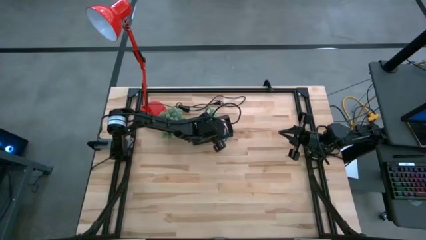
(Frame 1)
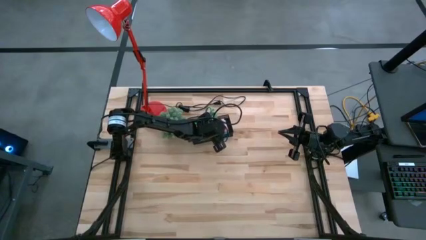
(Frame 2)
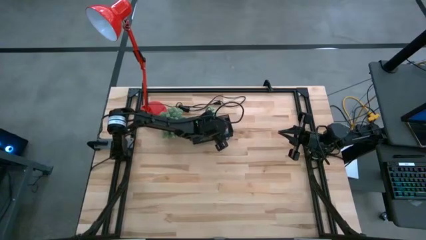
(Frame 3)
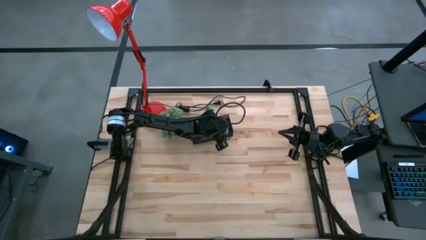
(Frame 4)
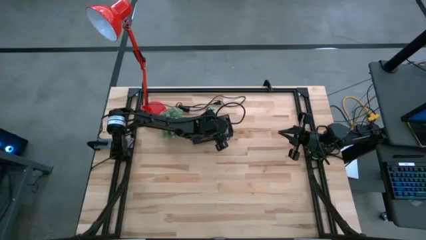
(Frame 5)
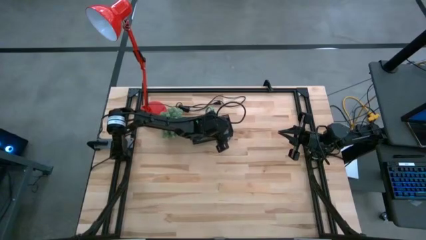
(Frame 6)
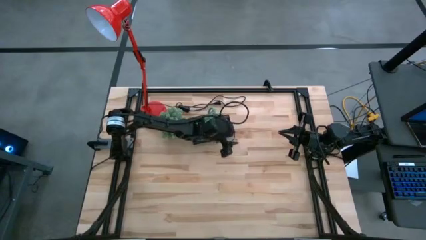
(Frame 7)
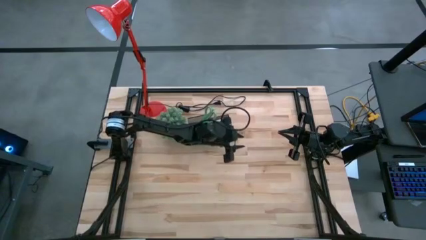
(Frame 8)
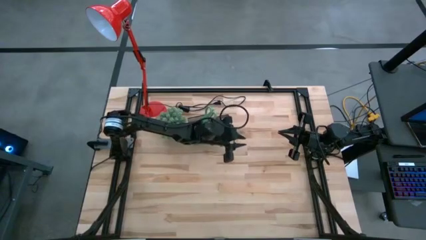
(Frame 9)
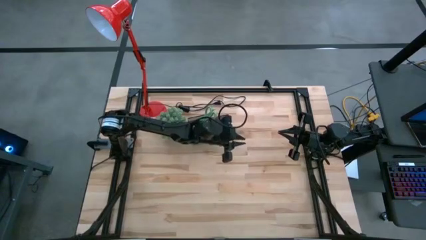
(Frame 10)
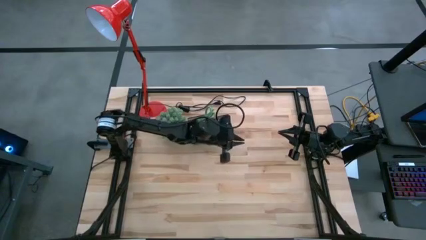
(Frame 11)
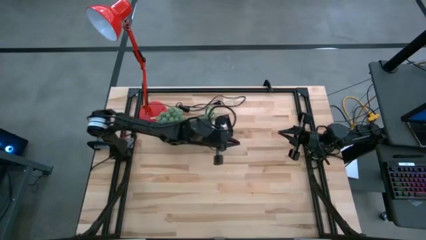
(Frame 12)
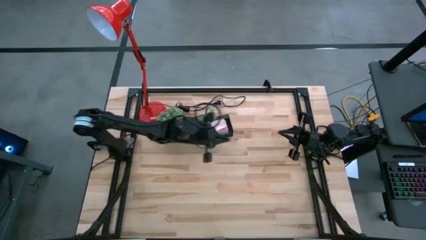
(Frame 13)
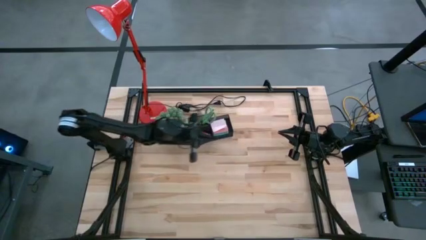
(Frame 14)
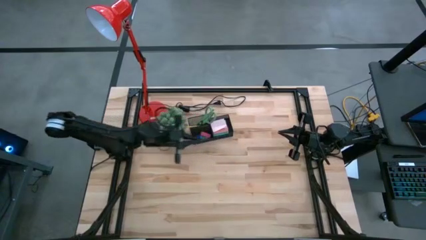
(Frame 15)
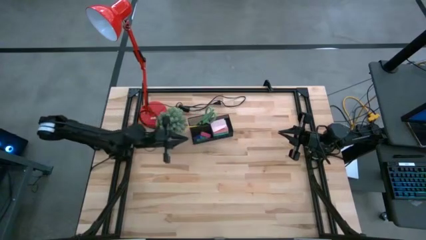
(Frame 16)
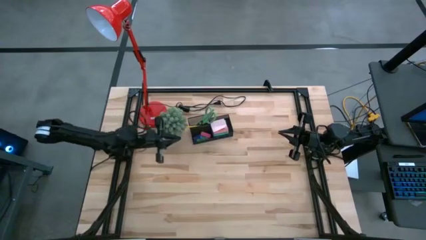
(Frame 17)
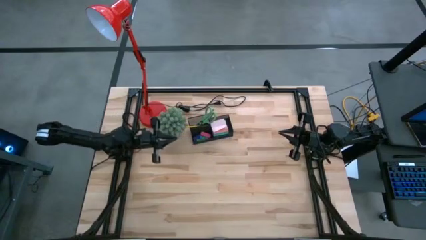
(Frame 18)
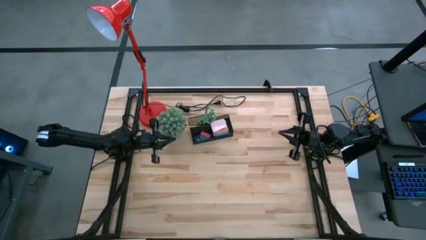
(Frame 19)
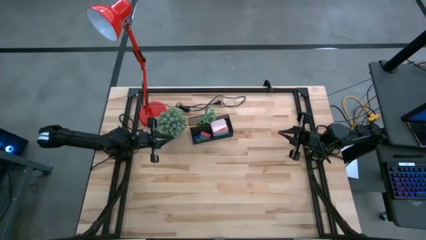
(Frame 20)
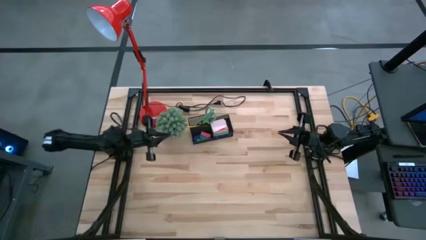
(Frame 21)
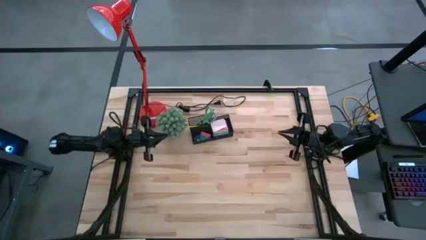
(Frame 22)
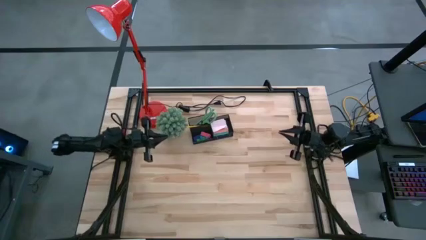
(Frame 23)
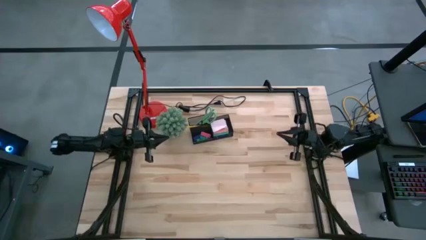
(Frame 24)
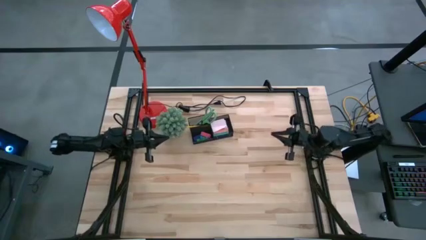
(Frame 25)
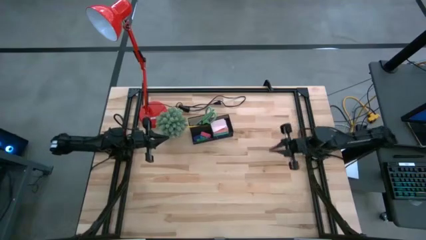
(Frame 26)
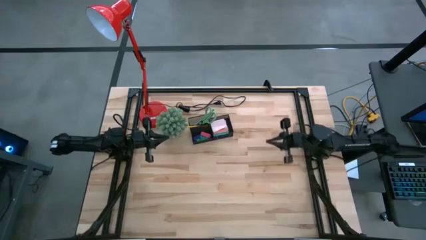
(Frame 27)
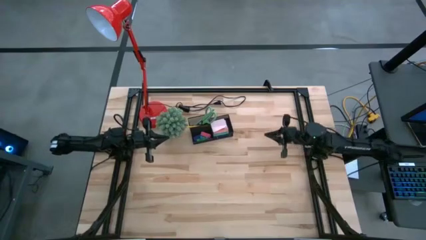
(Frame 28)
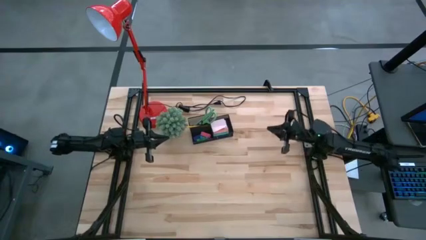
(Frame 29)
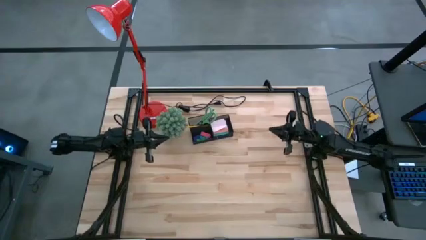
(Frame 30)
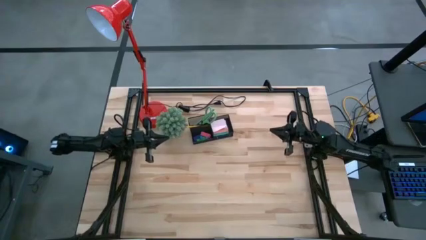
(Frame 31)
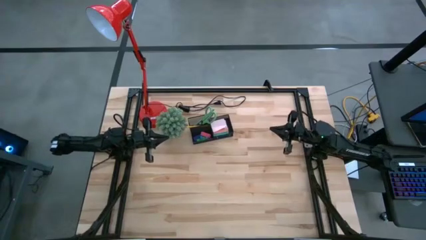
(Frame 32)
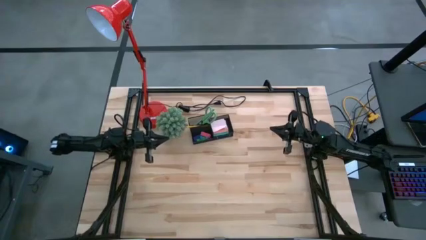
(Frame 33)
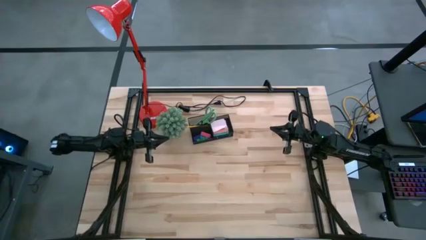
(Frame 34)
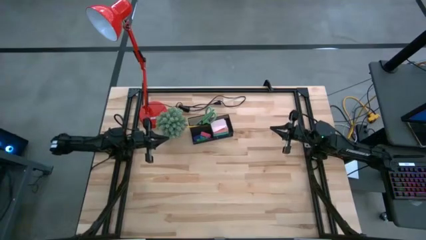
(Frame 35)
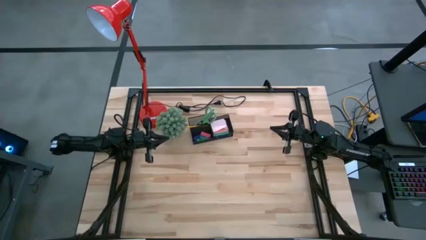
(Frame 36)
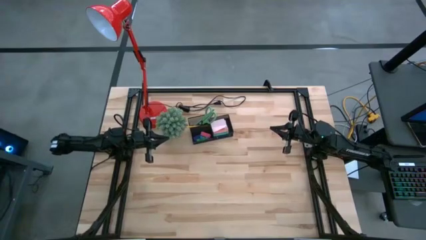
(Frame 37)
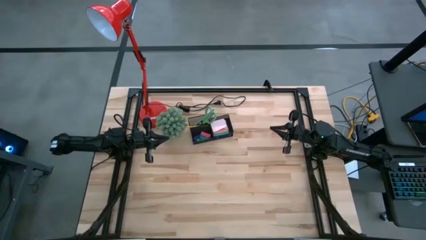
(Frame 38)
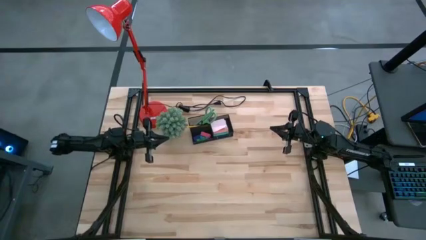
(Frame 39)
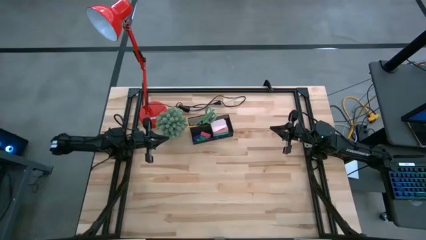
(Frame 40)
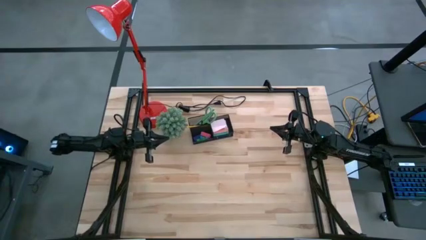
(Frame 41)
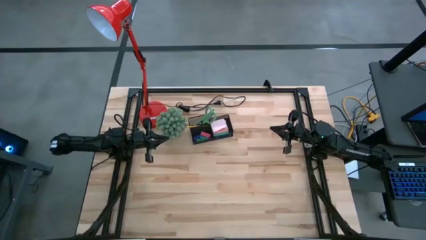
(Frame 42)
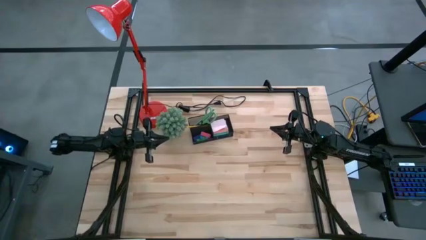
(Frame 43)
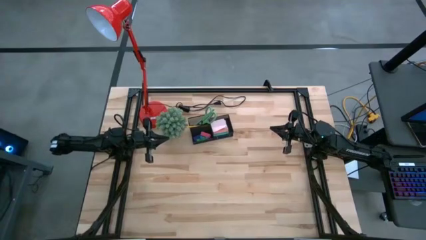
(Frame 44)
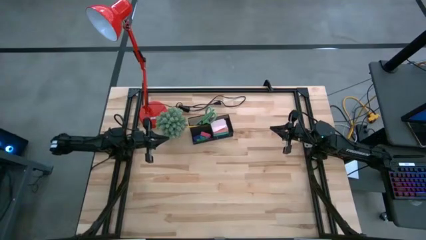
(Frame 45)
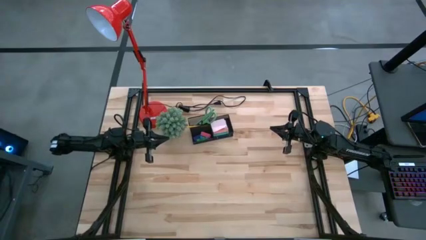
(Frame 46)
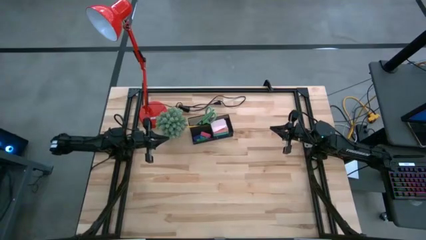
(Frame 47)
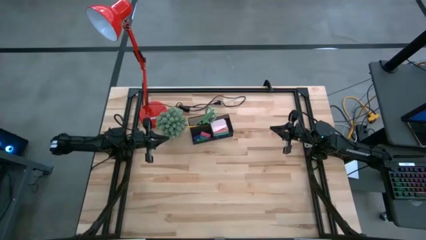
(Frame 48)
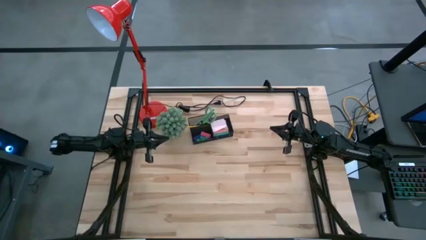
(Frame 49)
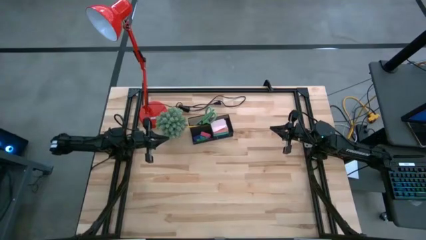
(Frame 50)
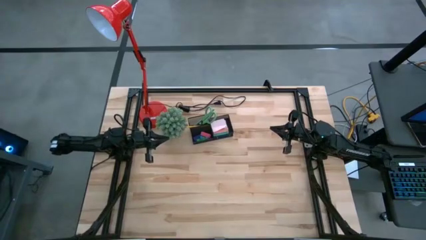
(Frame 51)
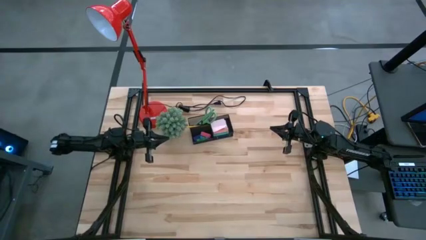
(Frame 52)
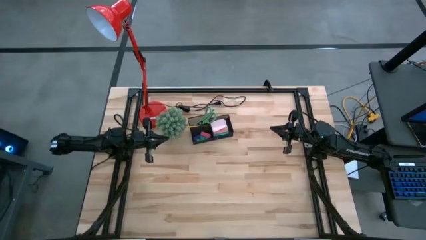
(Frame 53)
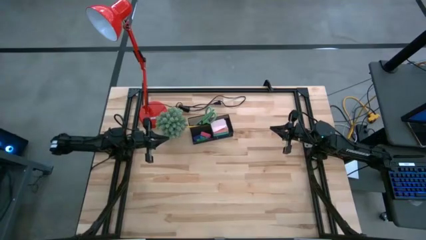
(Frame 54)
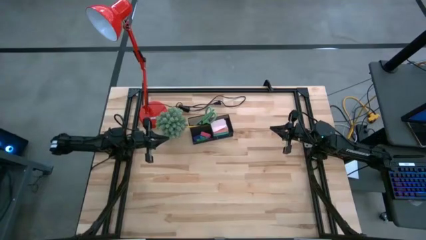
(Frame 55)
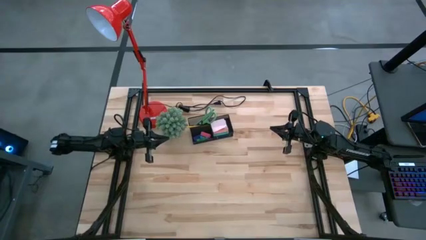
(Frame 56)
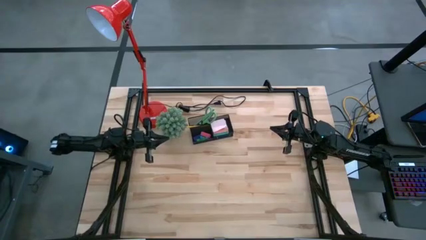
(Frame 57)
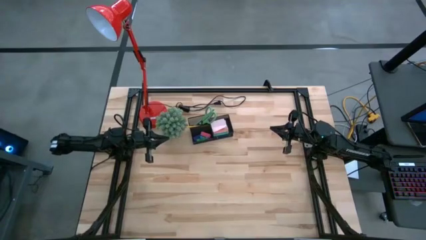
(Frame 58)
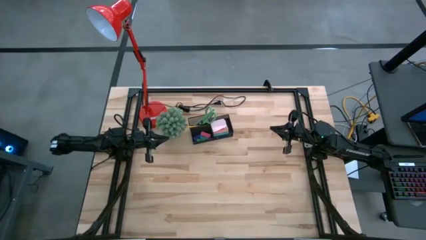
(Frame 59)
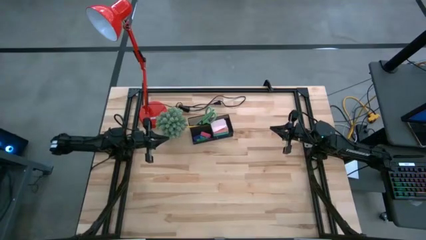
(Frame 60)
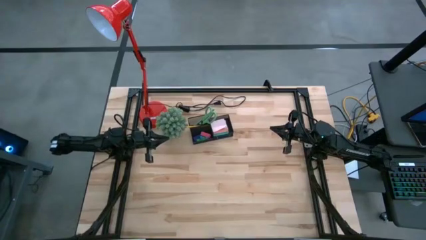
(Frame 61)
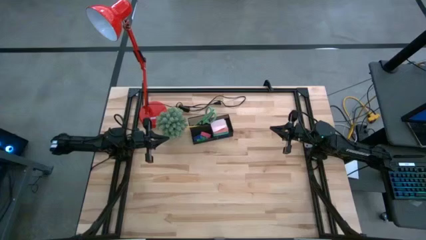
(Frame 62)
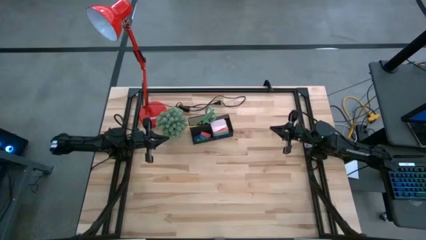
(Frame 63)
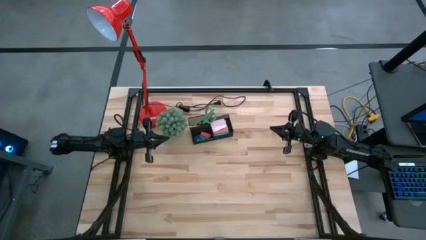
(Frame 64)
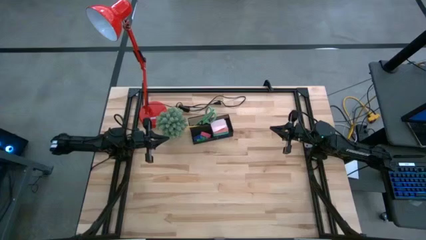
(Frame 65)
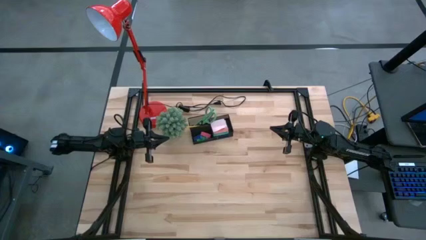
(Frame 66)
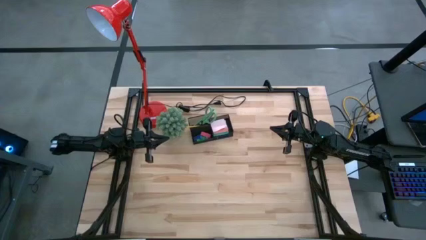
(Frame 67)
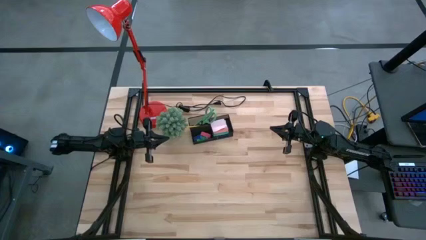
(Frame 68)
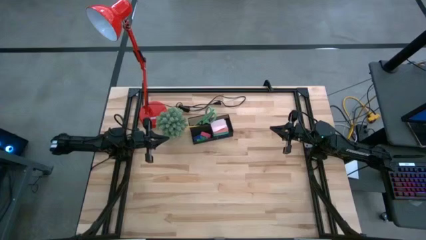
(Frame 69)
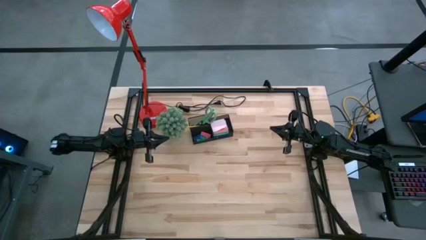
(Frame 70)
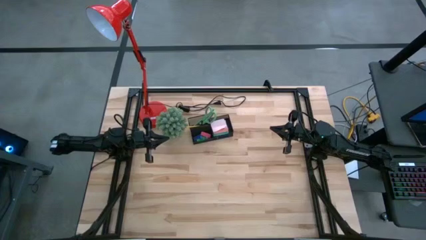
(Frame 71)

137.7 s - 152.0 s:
Task: Pick and place office supplies into organizer
Return to Home Position

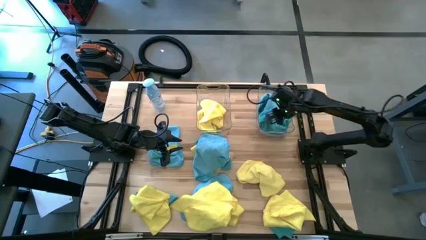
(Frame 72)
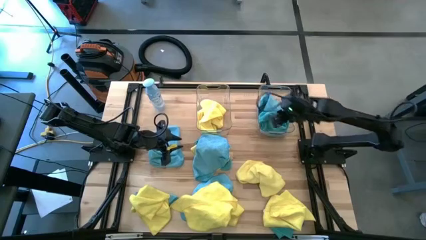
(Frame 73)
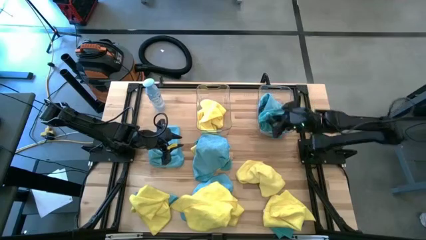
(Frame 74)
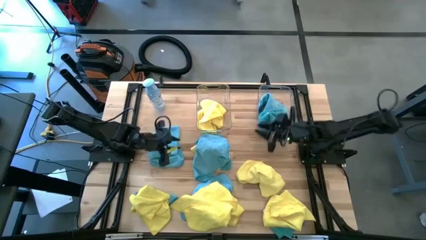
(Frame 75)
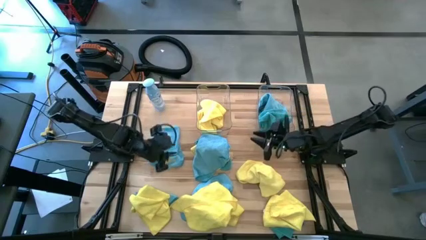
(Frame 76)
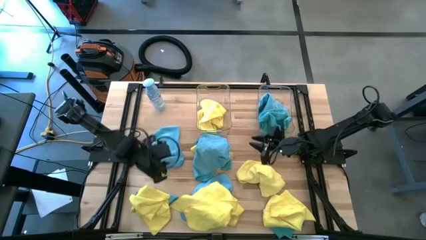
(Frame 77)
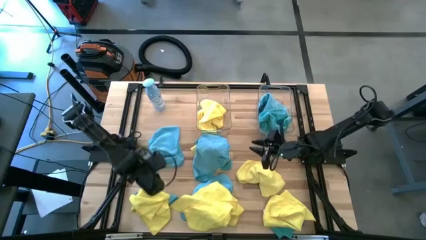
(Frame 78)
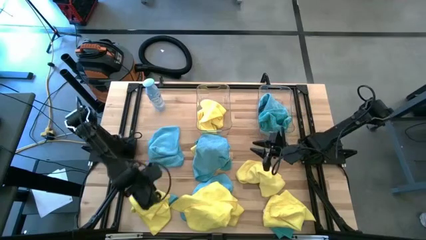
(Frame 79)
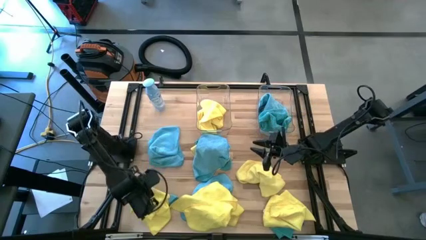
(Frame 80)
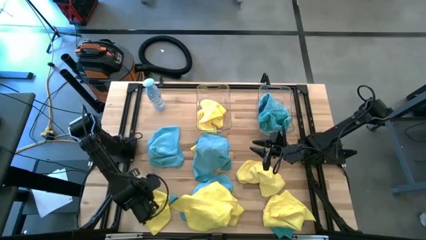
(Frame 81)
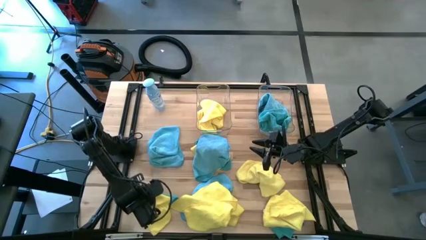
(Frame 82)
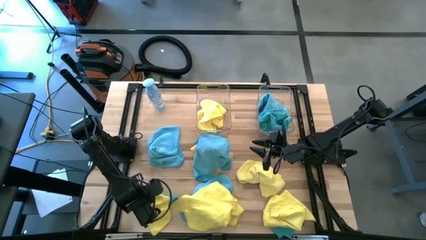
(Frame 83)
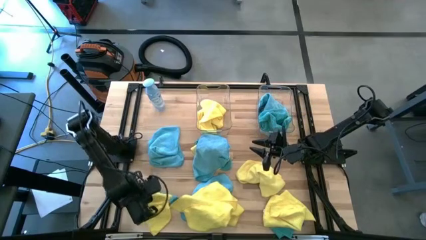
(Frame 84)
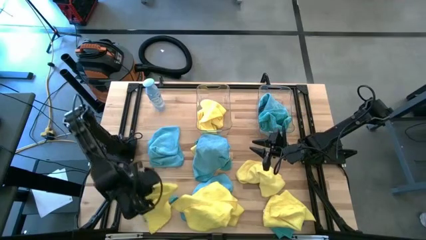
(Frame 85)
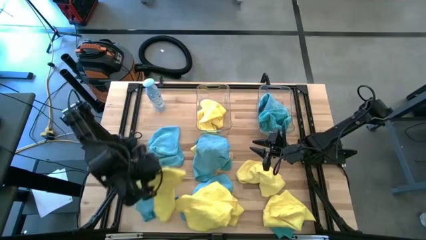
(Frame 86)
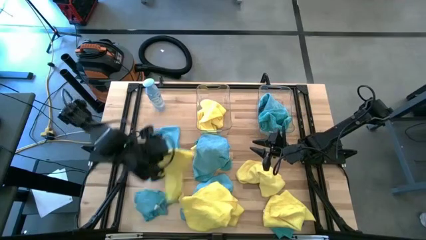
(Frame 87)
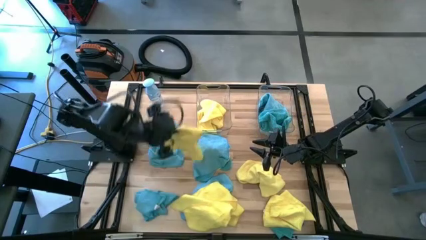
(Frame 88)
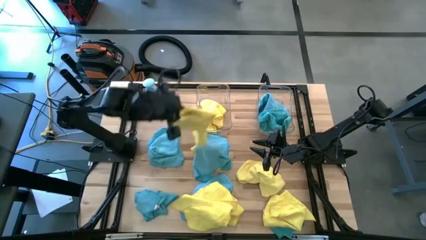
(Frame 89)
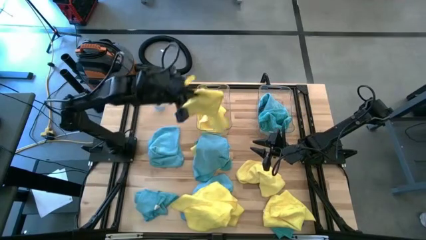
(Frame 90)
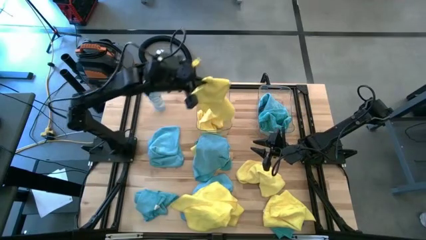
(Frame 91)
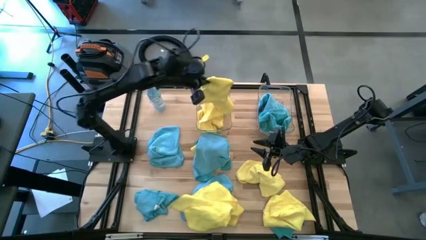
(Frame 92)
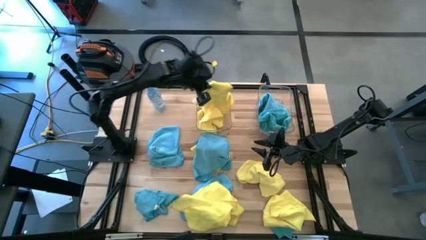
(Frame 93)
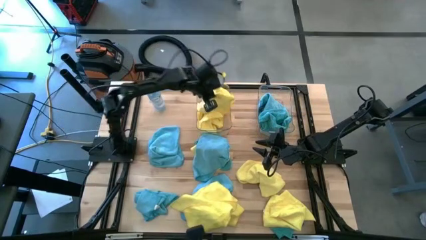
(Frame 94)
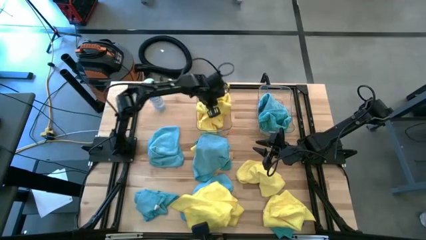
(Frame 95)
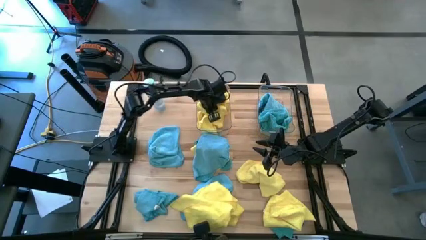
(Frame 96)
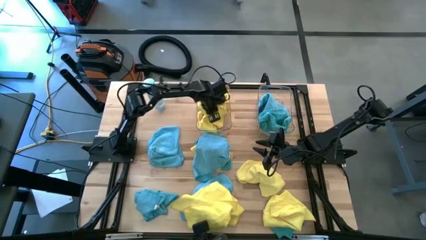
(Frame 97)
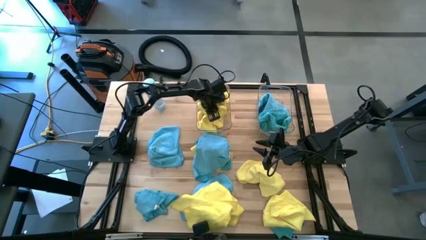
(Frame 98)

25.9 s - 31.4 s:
Task: Sort microfiber towel by color & place in baskets
Put the yellow towel into the left transparent bin
